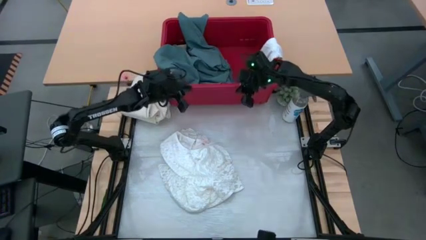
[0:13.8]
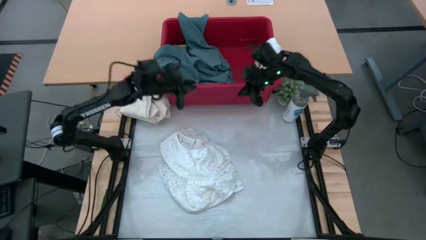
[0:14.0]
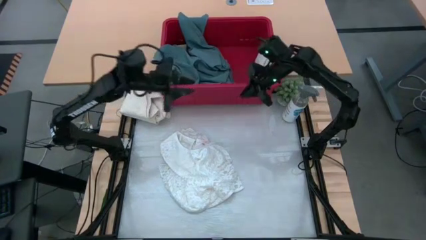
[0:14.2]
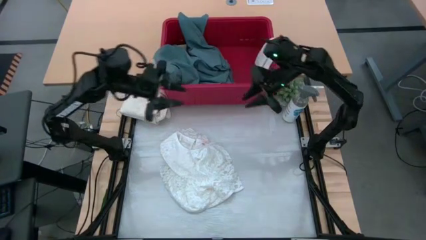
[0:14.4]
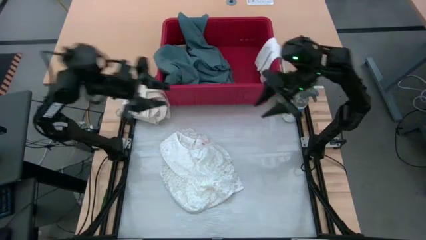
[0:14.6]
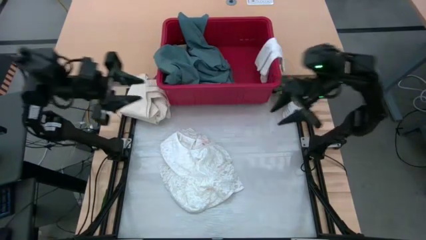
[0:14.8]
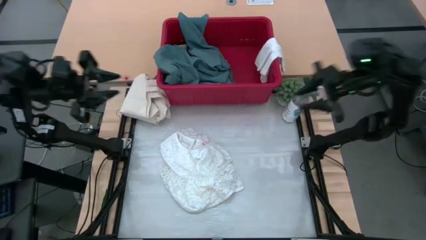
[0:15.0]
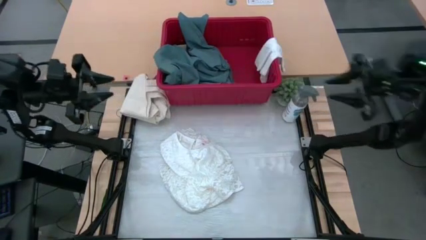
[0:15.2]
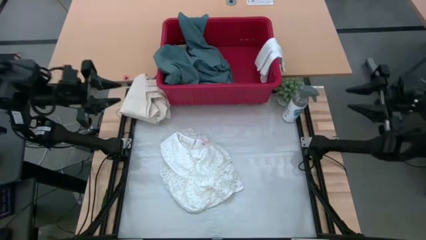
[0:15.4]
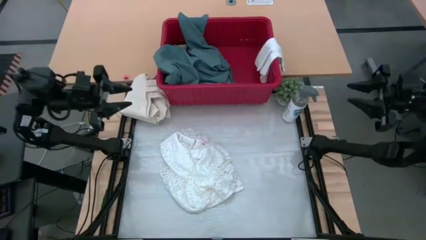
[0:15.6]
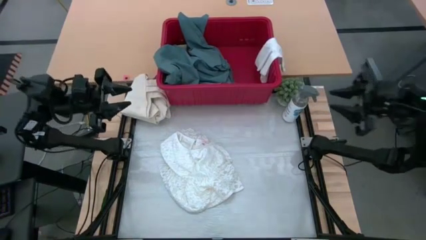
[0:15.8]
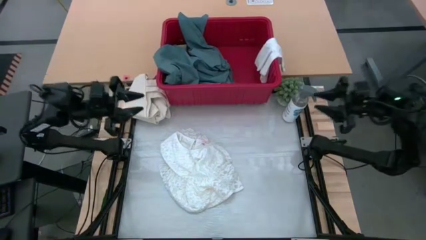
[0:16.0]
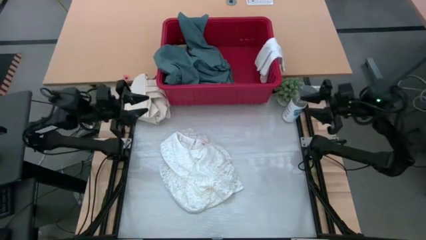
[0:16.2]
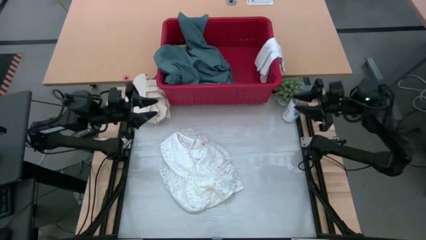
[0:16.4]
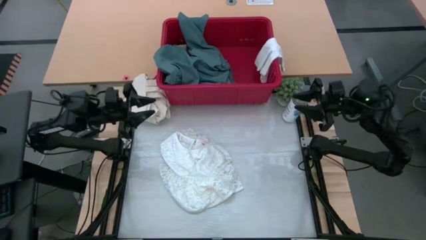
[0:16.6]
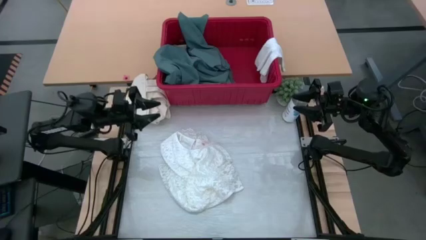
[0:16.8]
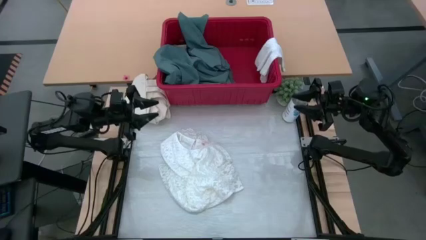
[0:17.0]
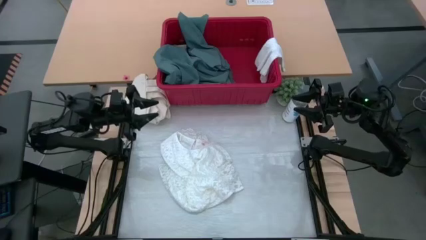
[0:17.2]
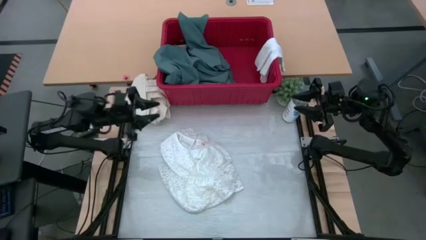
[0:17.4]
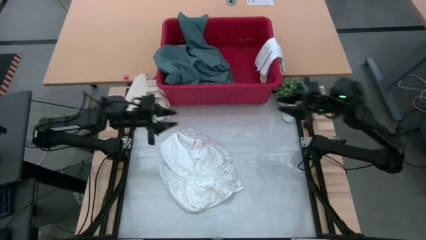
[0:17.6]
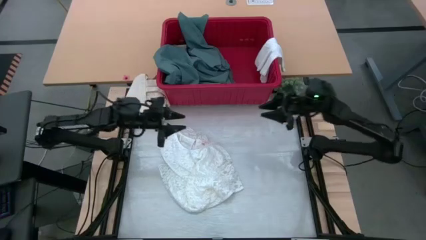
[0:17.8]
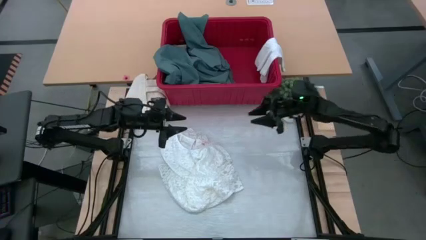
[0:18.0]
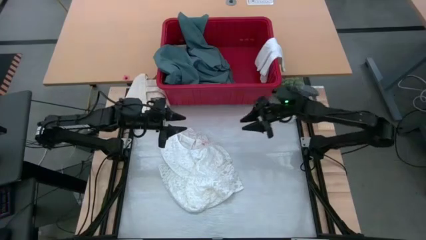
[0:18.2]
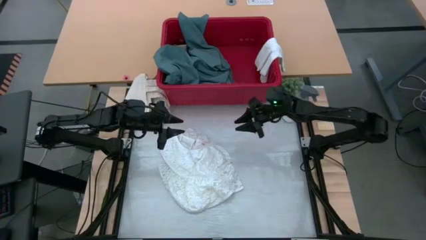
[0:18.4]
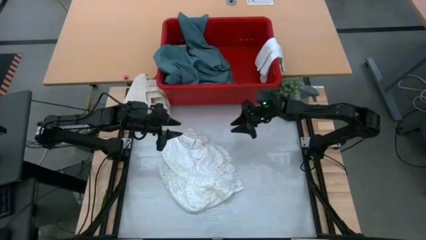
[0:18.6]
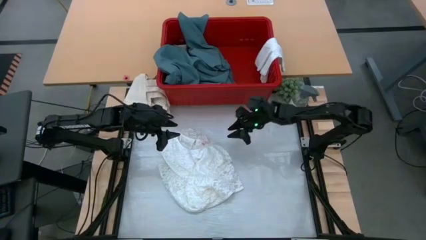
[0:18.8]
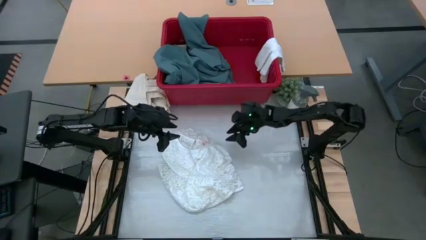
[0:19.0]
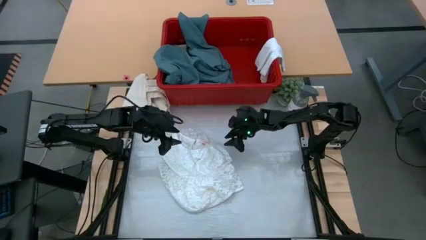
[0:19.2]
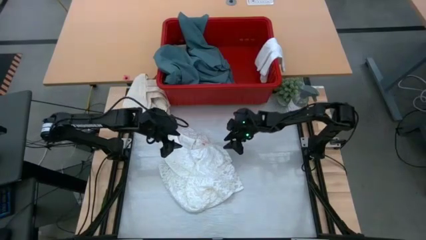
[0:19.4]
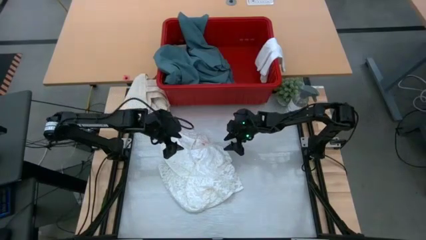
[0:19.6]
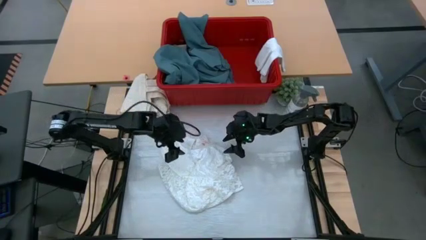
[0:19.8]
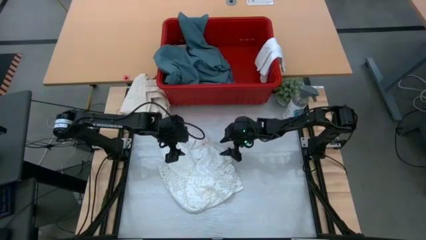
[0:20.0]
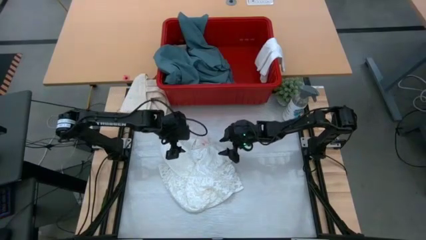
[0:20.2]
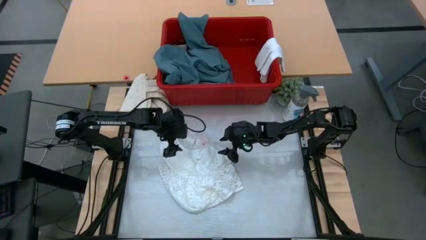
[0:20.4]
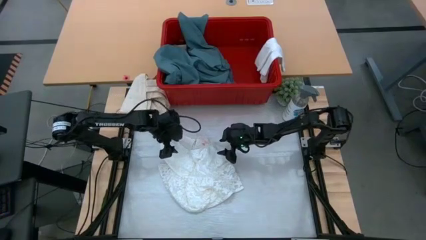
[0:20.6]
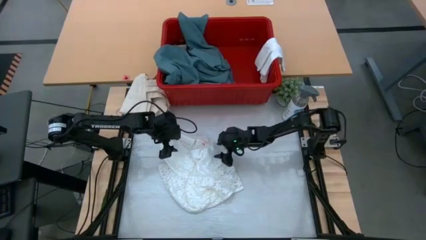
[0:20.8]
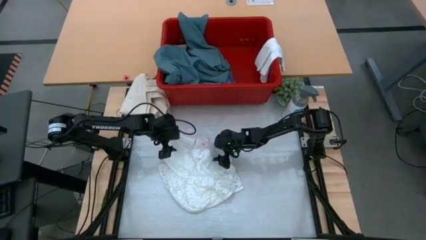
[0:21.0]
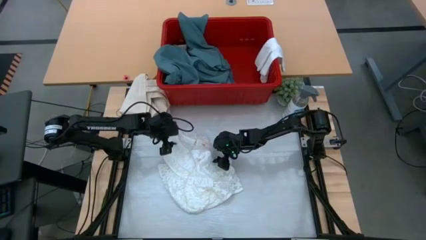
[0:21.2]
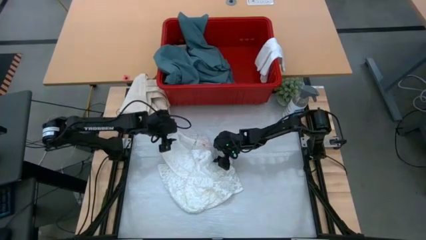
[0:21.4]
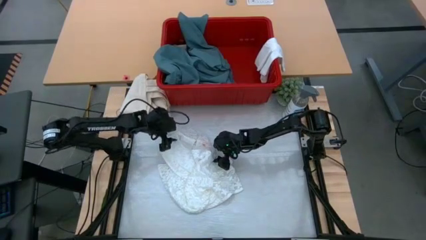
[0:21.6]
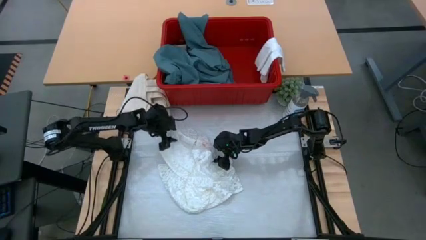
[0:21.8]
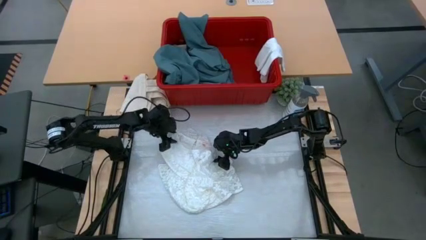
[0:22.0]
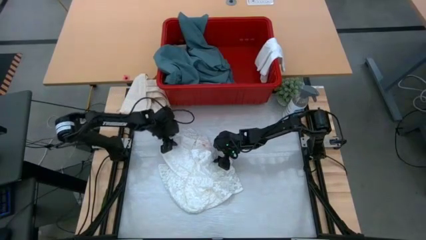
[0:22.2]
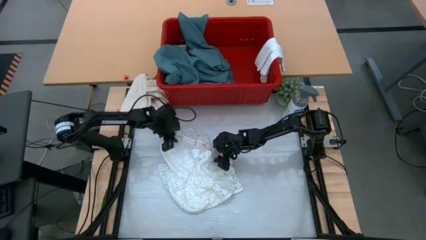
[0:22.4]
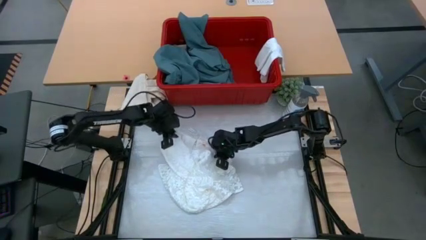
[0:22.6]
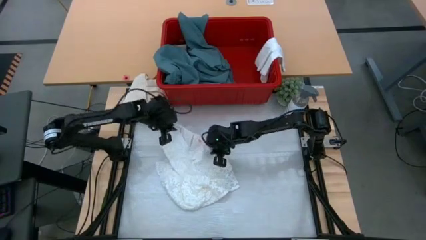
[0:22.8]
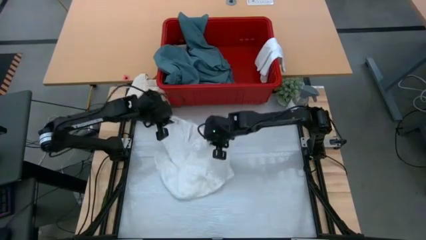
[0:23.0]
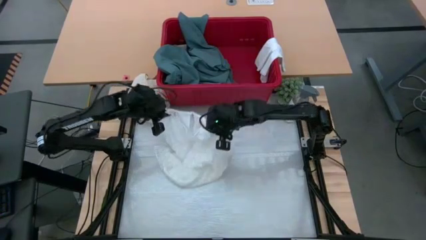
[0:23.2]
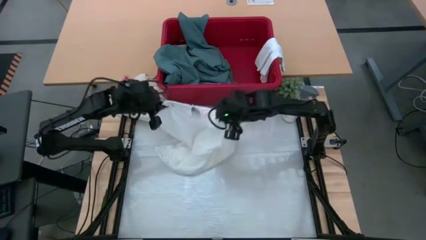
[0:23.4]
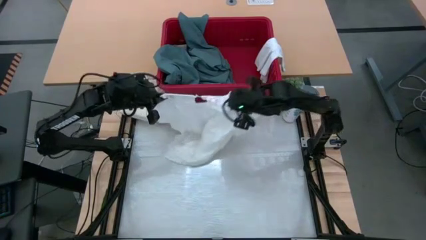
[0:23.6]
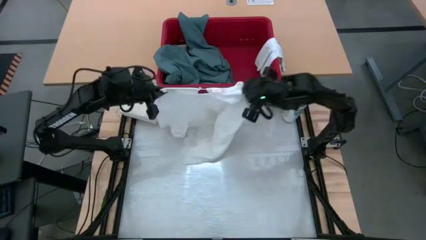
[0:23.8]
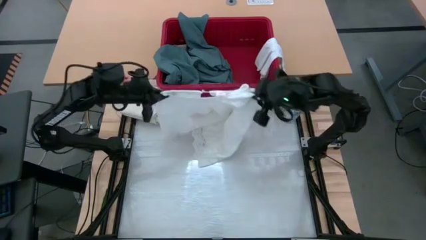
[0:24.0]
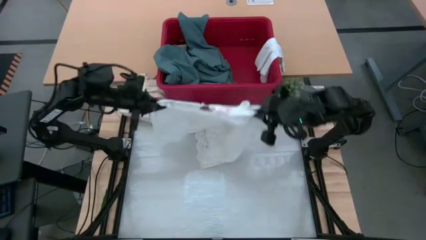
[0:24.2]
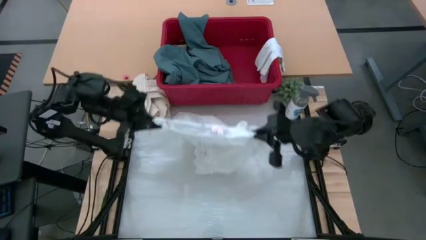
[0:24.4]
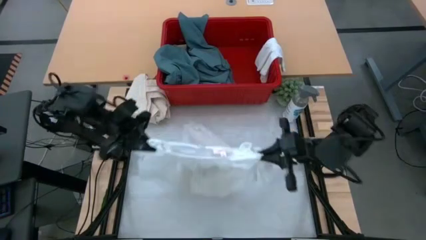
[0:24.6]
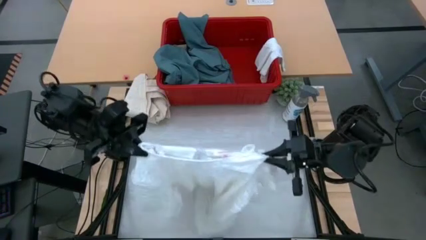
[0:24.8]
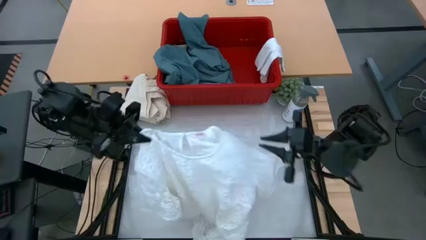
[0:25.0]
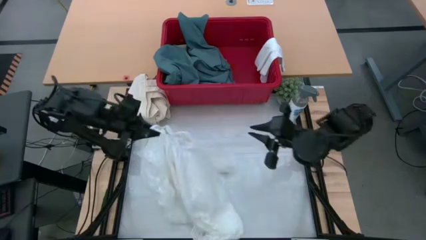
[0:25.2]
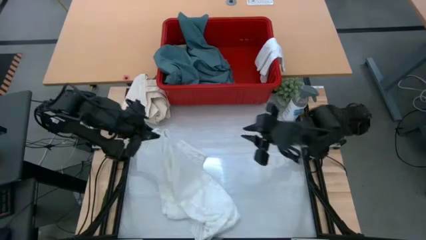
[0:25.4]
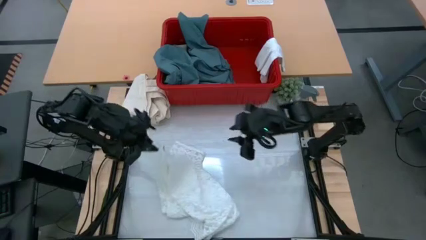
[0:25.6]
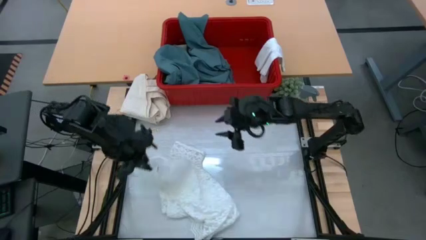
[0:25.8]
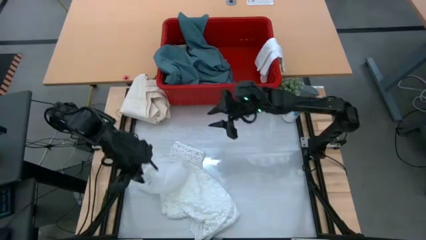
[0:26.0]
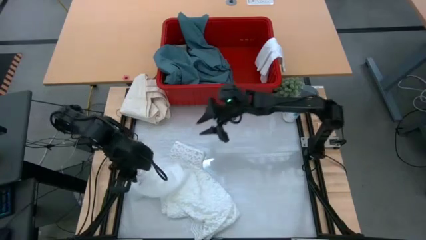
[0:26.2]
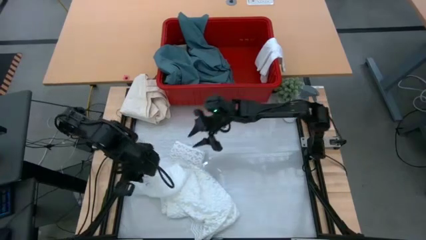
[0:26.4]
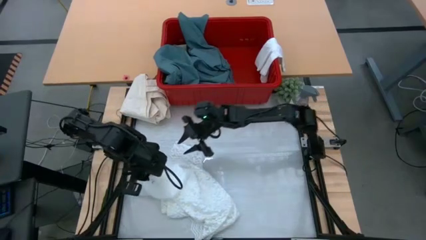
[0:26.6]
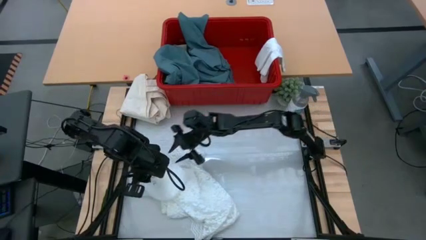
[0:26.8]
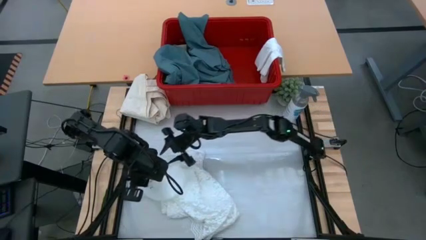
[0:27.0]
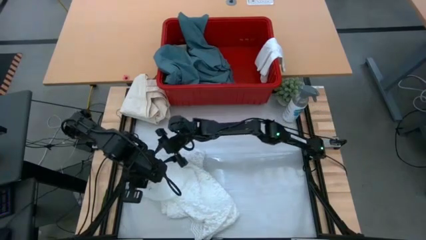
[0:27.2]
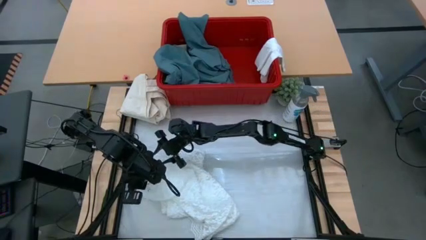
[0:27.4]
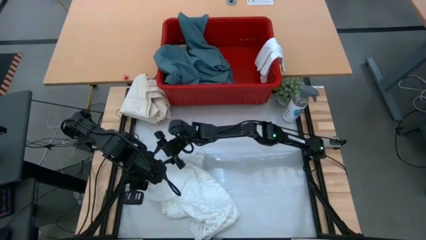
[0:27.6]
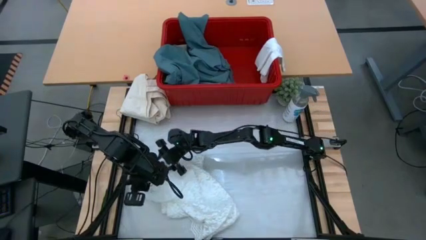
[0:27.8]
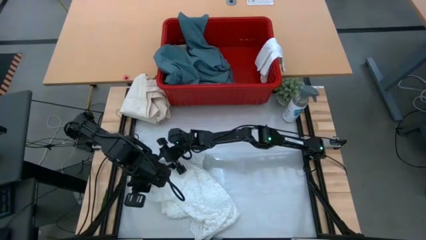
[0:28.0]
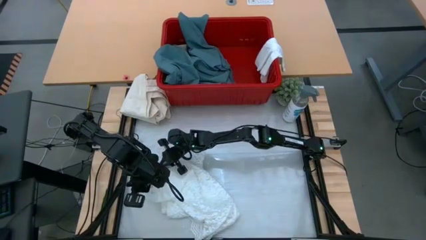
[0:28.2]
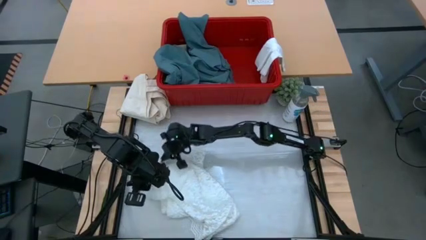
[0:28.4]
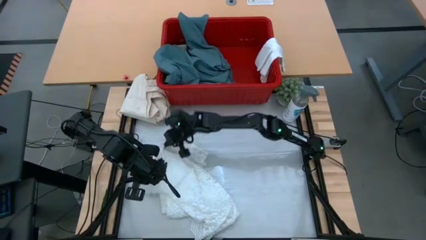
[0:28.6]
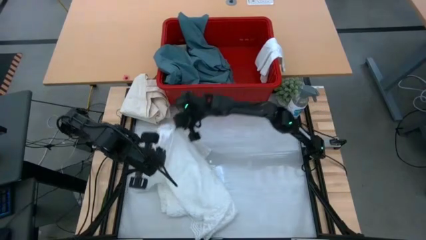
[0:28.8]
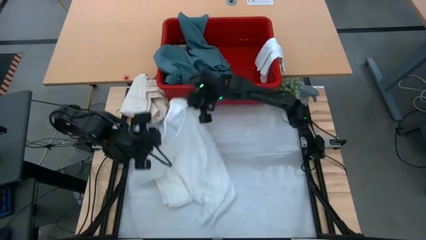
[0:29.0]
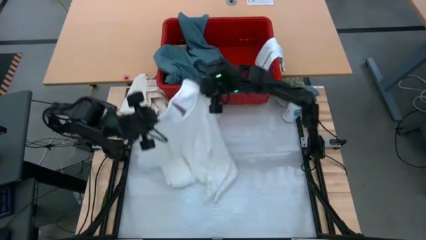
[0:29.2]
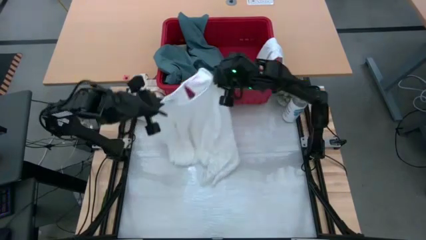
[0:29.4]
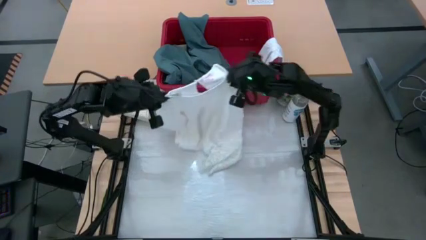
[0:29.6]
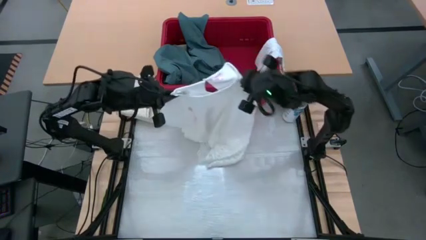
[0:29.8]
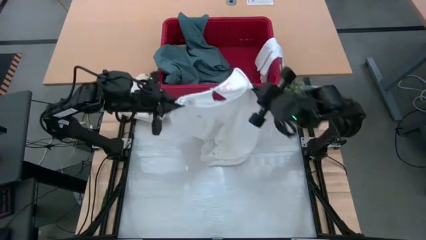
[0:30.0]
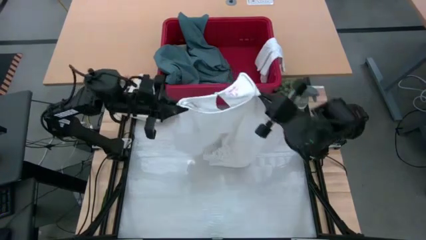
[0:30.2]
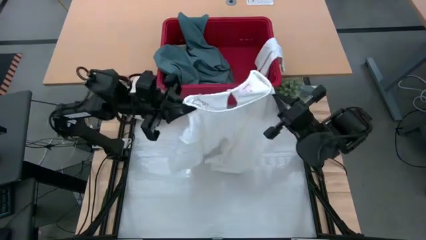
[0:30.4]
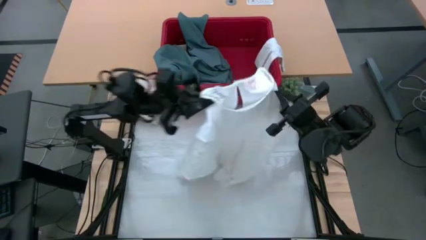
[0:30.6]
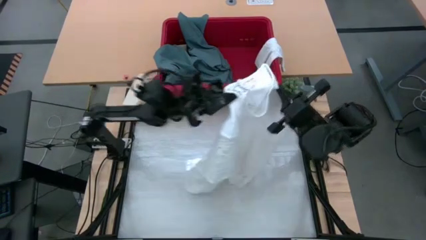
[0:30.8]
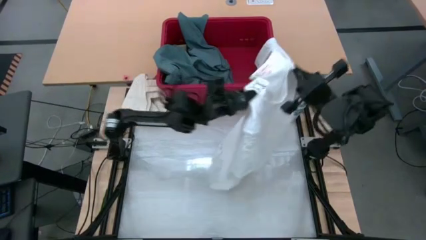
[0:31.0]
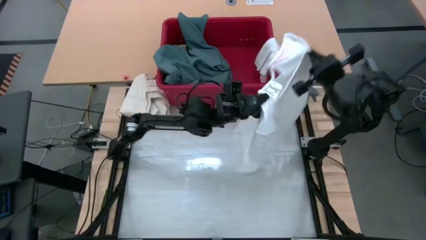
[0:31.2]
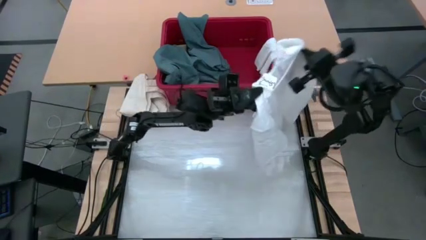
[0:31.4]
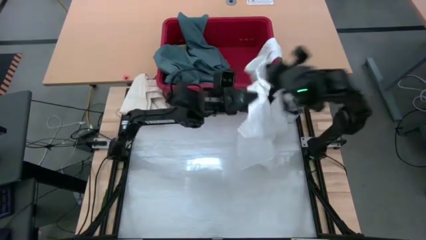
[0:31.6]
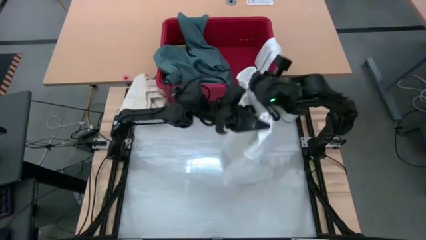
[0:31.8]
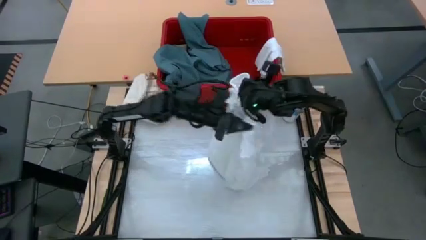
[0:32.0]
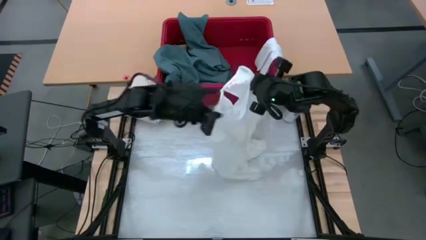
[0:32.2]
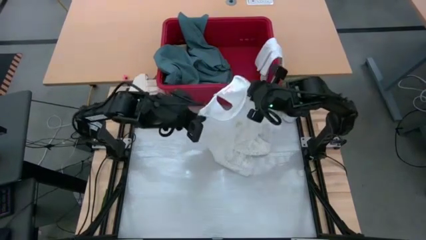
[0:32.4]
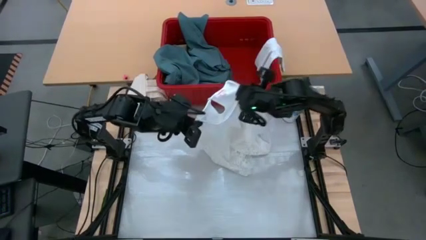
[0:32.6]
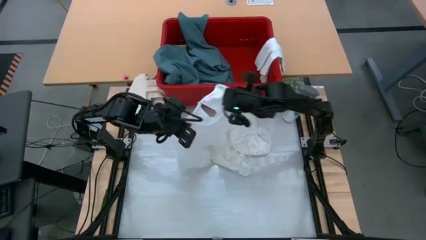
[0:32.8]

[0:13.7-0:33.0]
Task: Fold Laundry from Bin
Fold the white shirt
